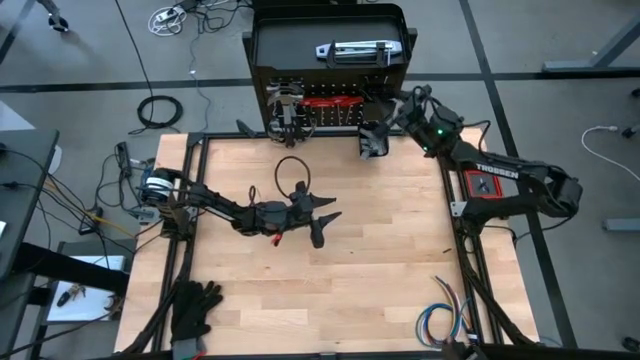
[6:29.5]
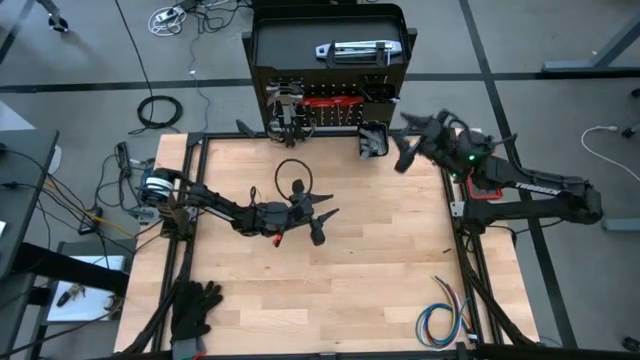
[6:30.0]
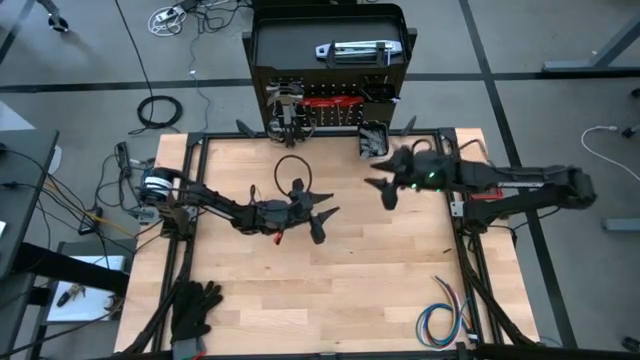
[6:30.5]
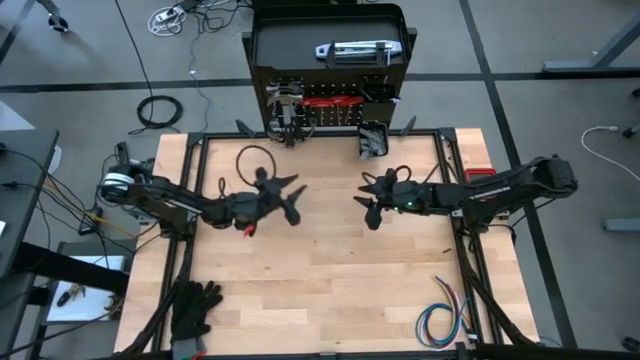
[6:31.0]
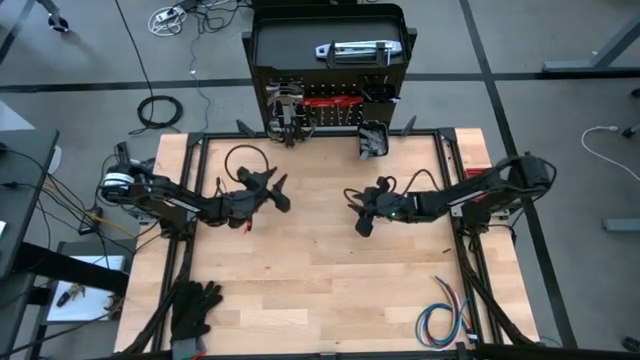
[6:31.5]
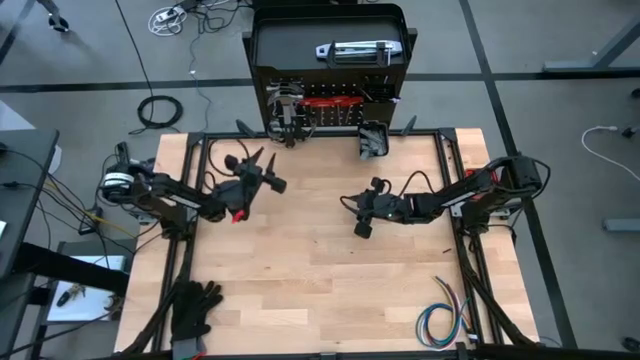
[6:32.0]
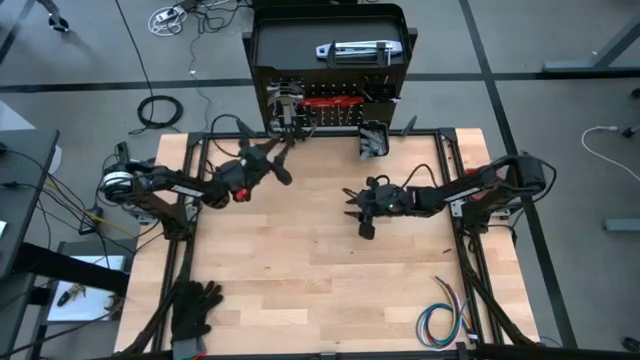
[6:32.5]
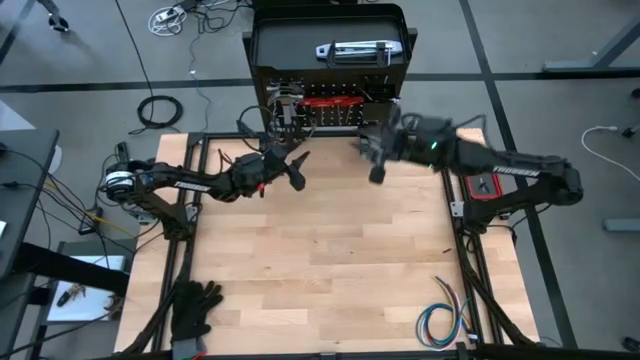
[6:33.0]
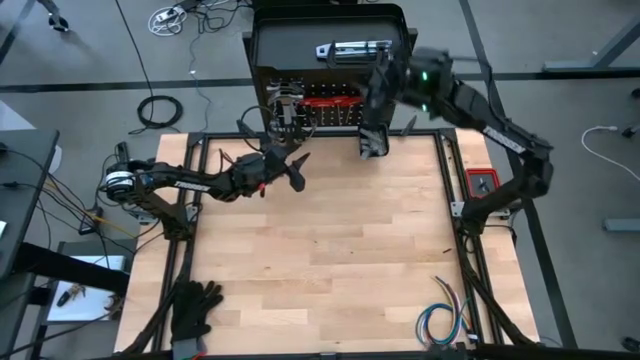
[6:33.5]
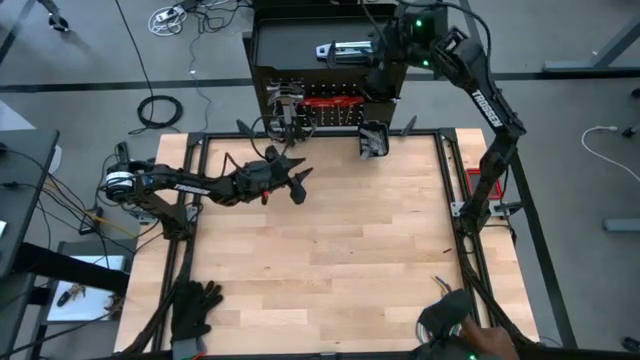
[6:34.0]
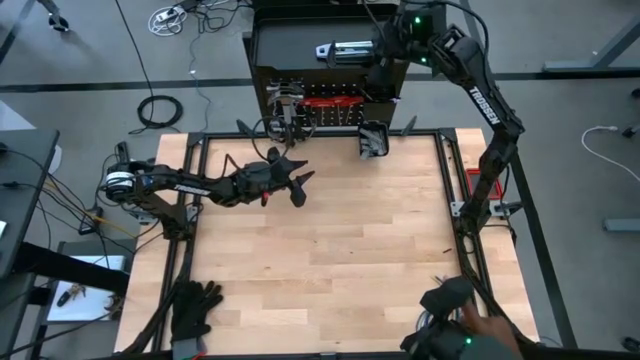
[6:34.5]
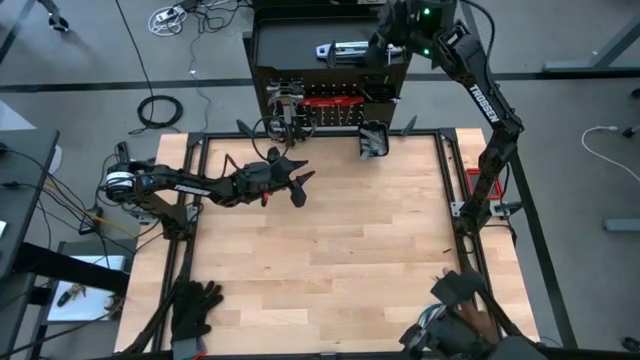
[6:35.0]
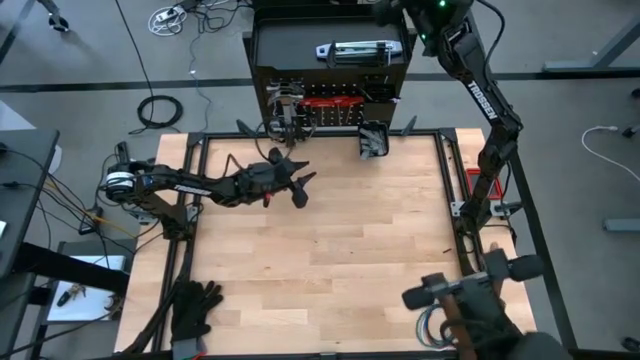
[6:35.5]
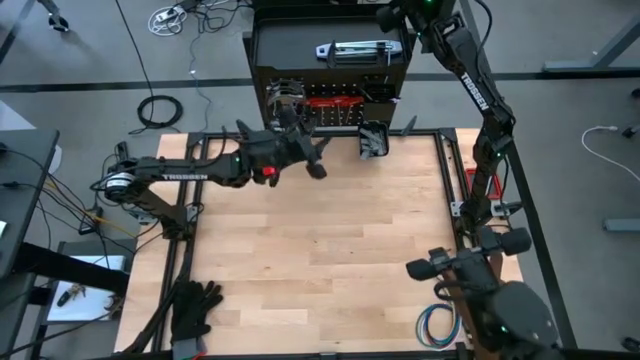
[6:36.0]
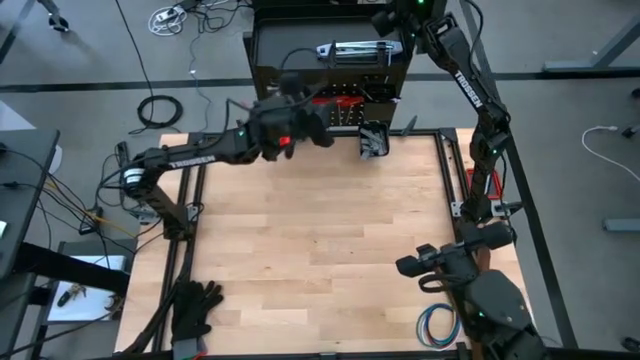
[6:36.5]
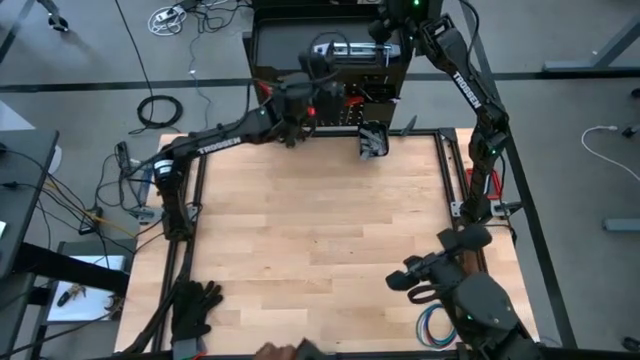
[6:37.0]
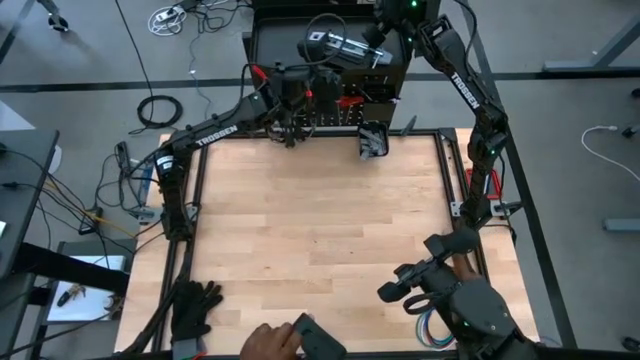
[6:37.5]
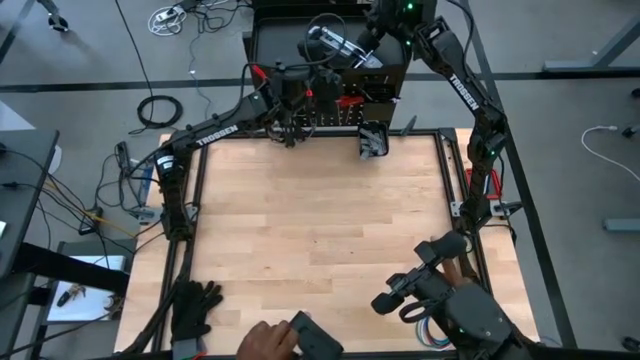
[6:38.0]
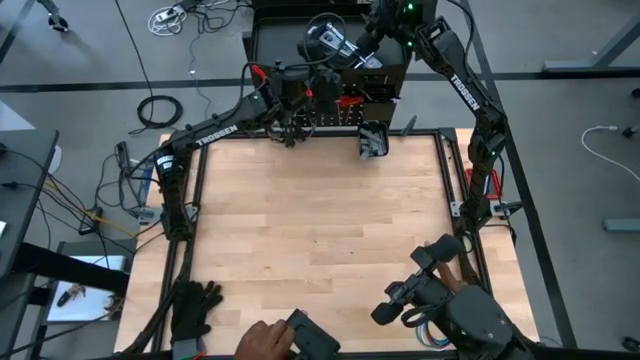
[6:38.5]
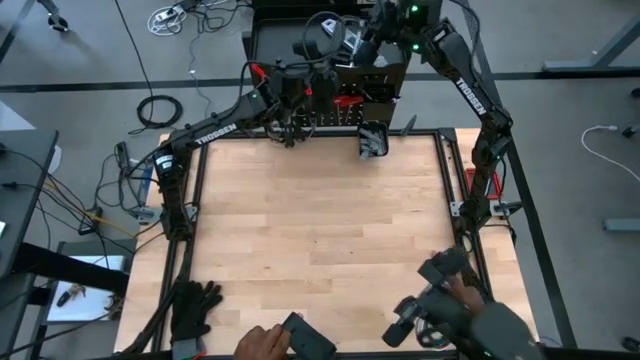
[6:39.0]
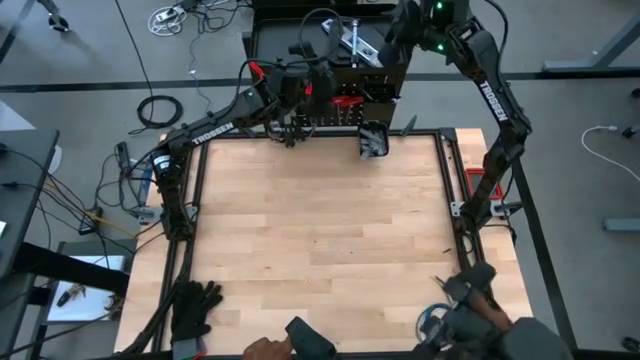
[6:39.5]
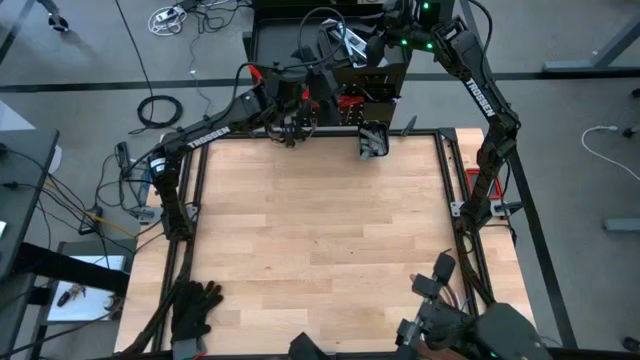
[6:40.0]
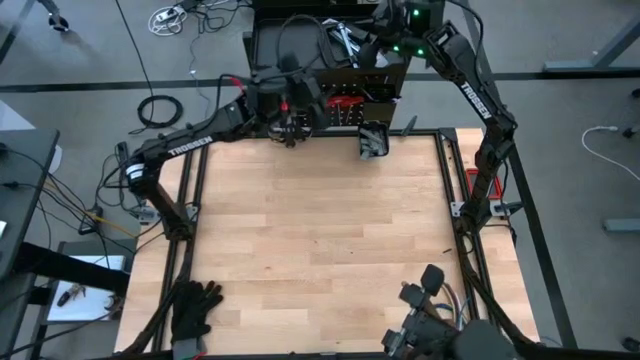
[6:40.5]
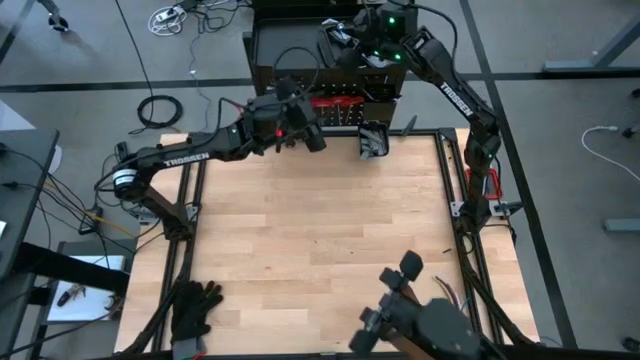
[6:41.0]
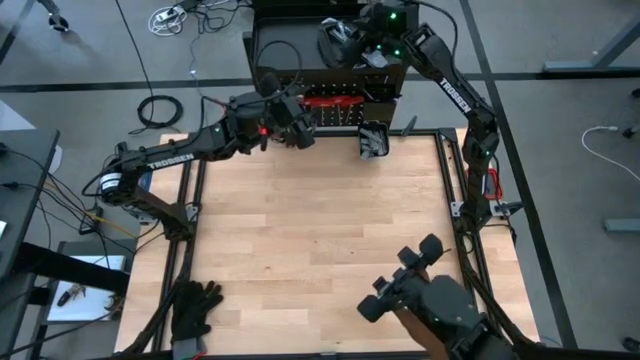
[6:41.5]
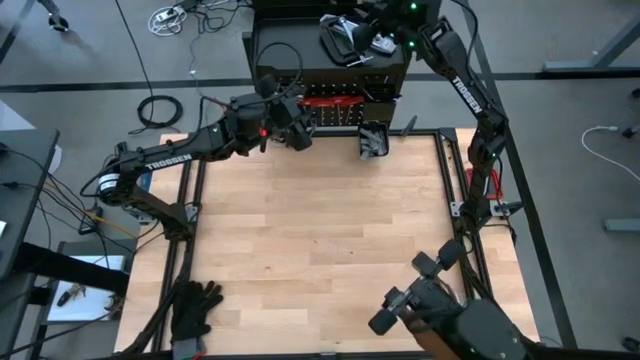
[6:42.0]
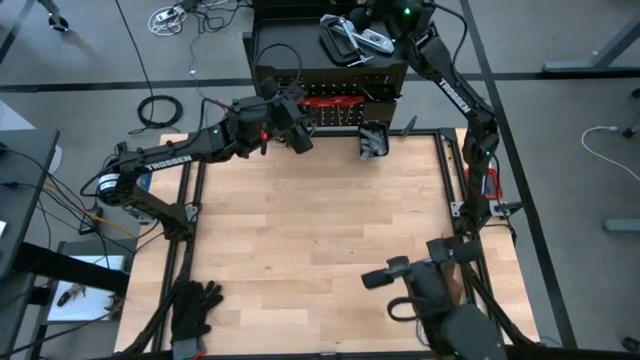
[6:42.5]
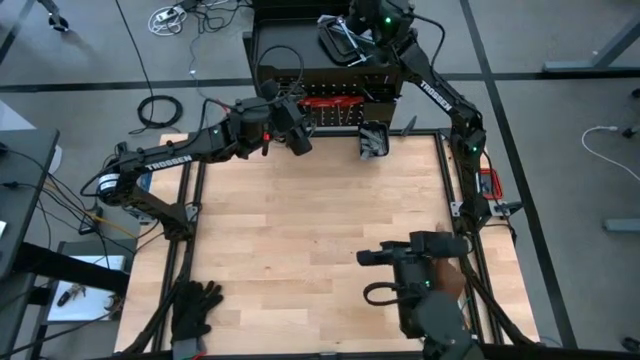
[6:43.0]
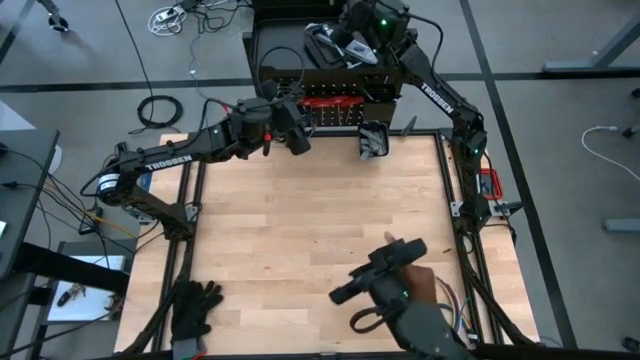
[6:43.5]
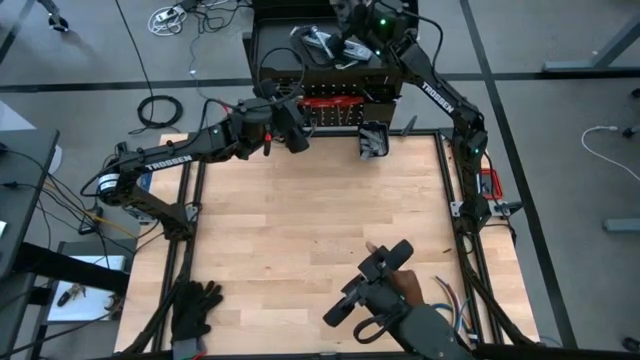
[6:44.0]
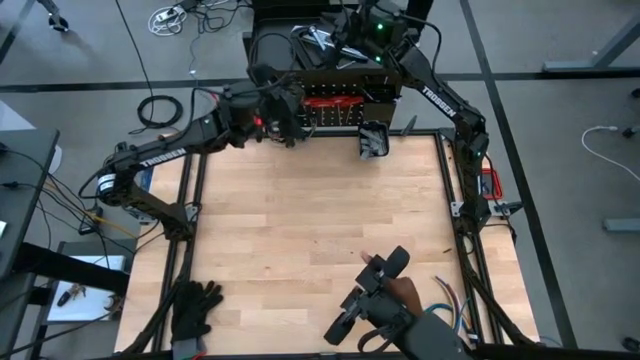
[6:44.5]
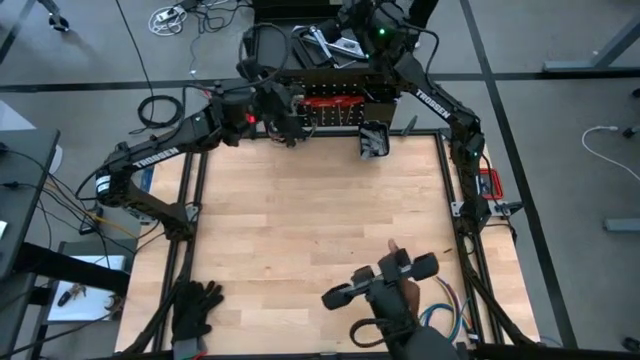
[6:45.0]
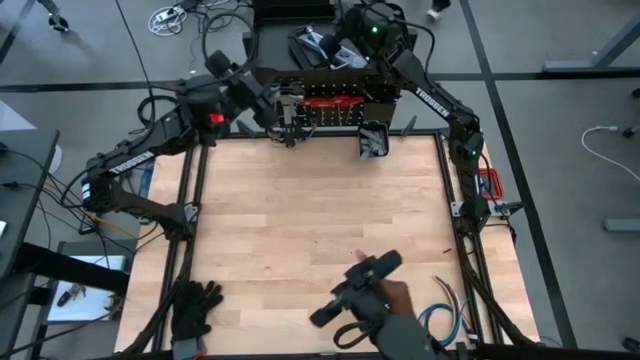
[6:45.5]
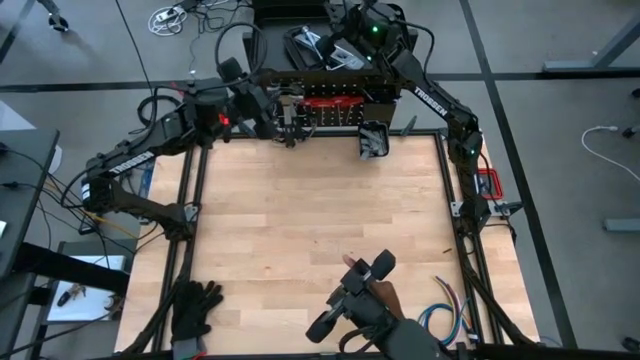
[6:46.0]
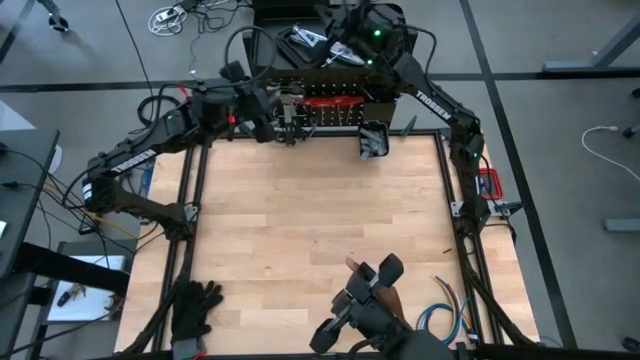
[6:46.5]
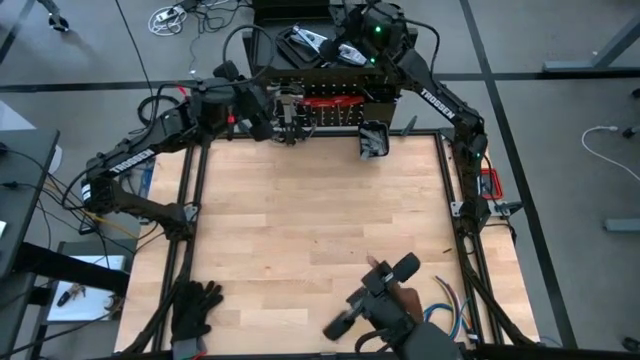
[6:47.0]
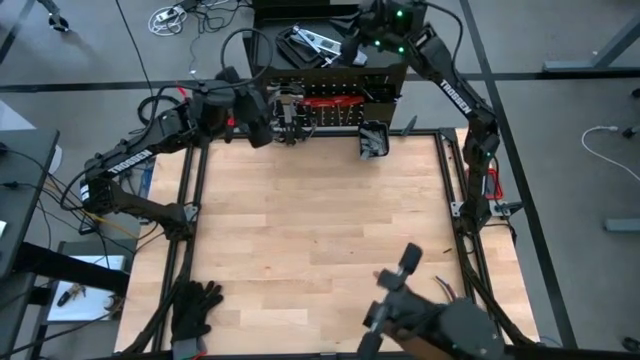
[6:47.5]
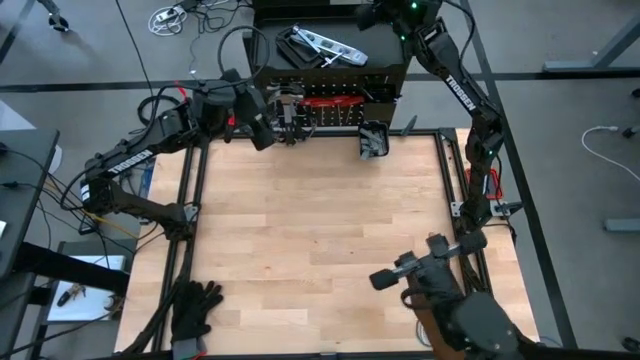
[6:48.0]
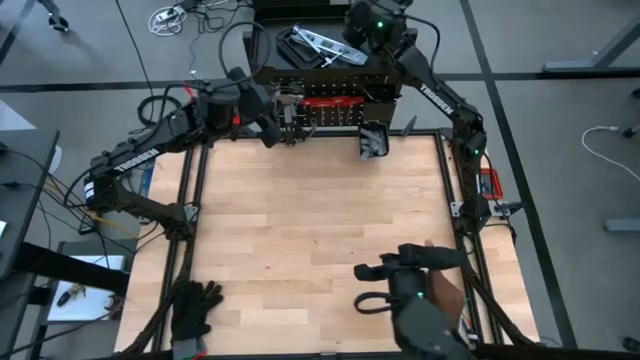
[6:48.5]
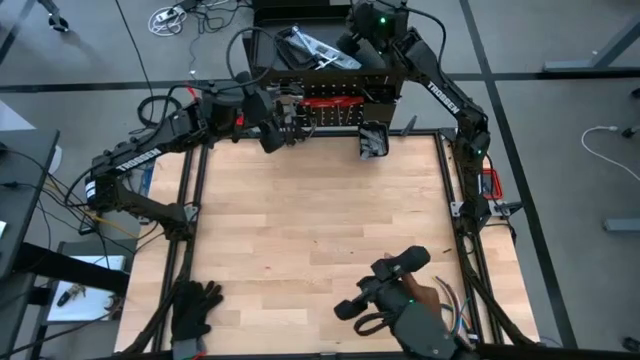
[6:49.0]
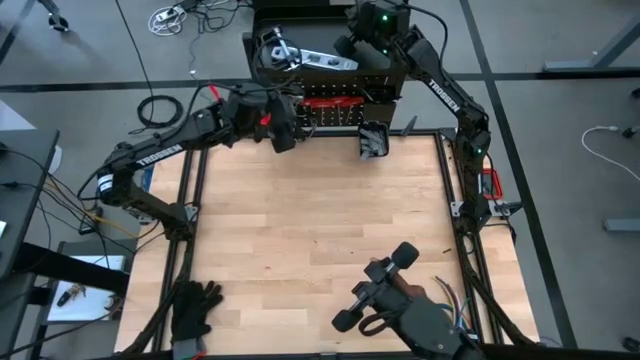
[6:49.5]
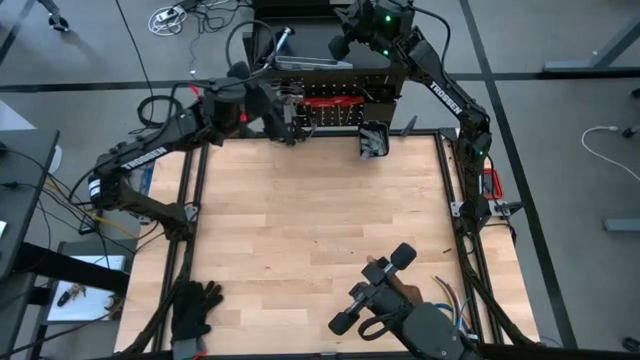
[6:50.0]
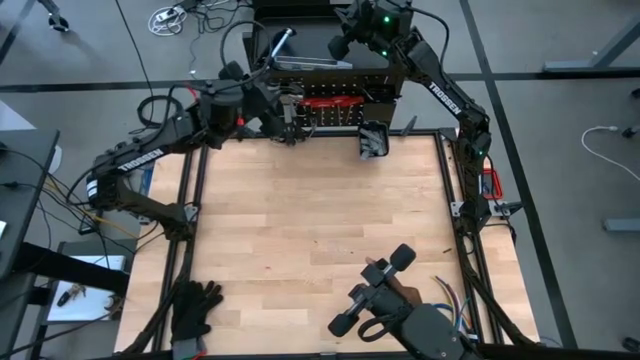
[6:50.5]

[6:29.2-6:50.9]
Task: Hang tools onto peg board
Put the C-clamp on the table
